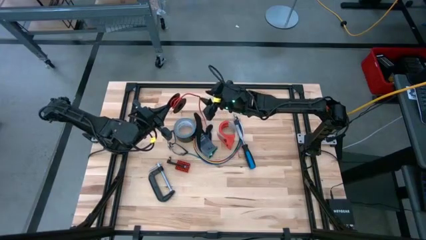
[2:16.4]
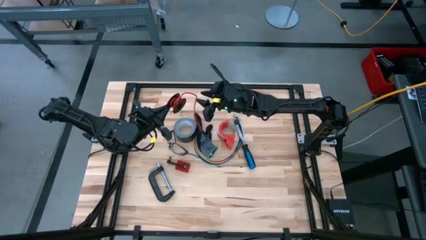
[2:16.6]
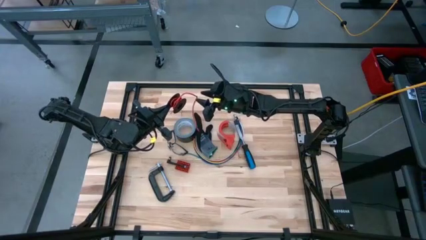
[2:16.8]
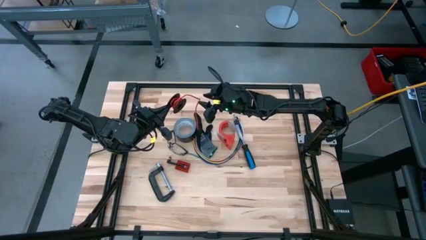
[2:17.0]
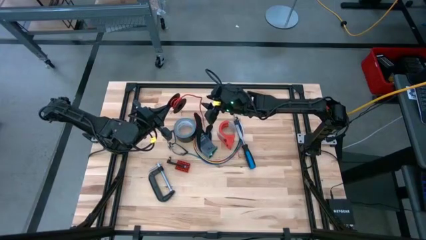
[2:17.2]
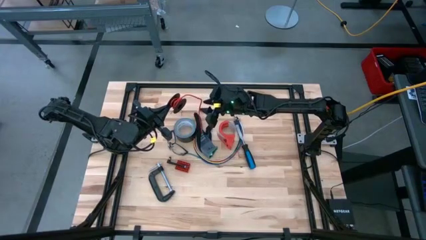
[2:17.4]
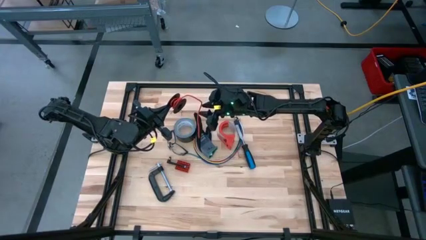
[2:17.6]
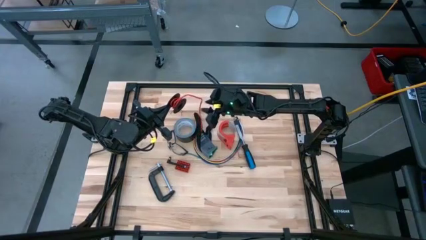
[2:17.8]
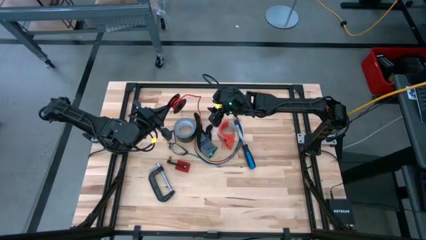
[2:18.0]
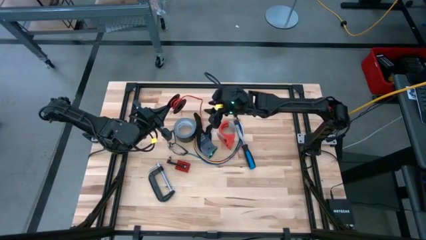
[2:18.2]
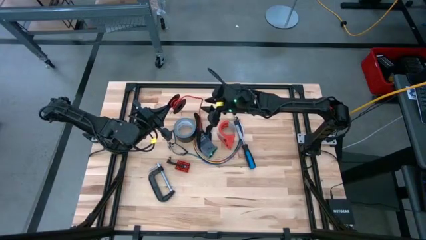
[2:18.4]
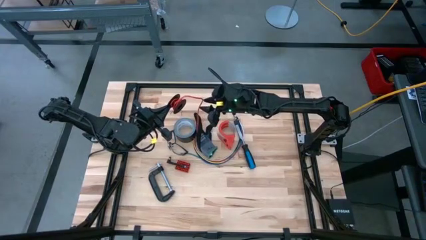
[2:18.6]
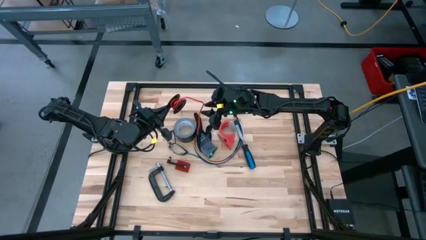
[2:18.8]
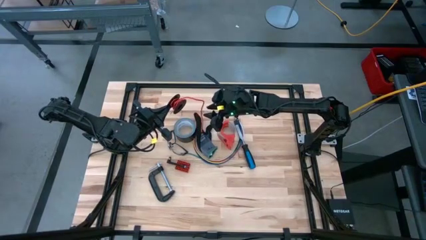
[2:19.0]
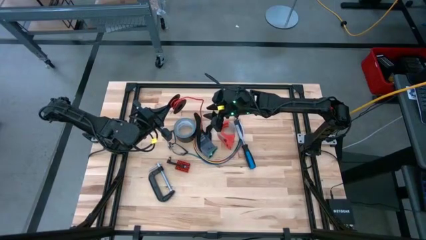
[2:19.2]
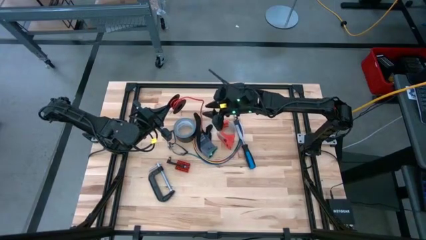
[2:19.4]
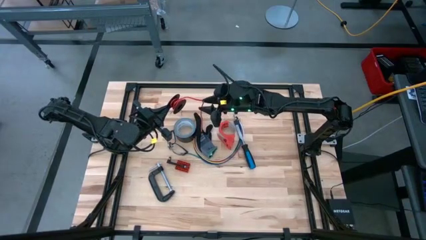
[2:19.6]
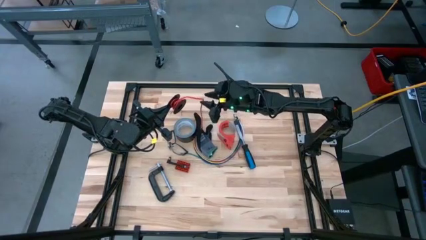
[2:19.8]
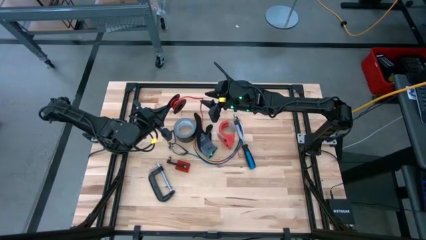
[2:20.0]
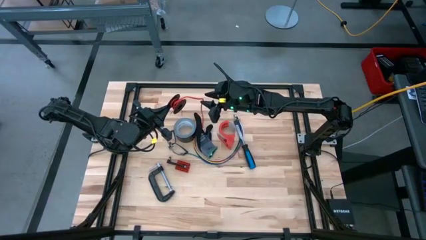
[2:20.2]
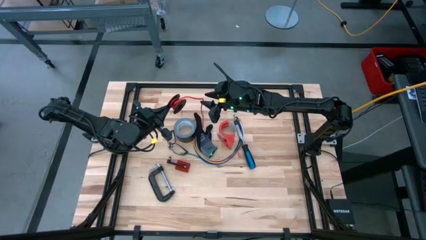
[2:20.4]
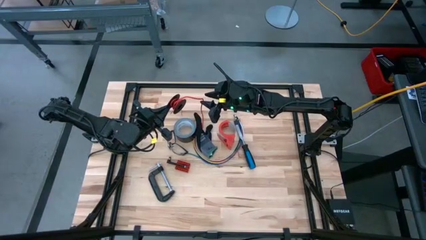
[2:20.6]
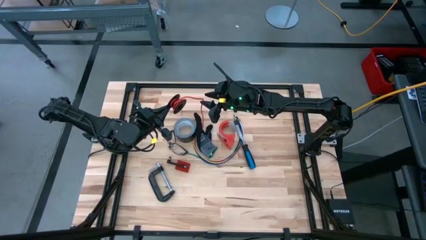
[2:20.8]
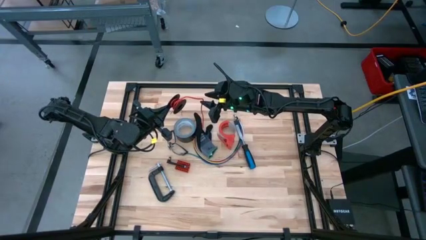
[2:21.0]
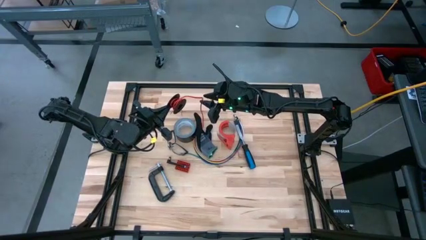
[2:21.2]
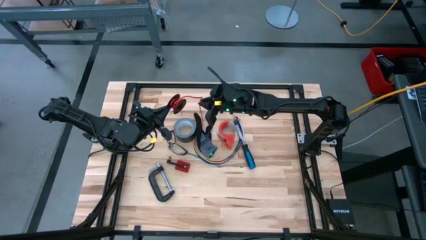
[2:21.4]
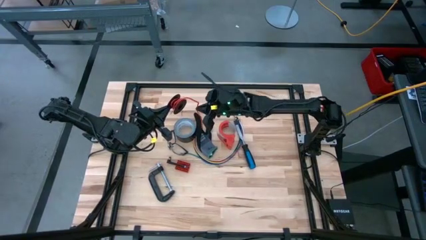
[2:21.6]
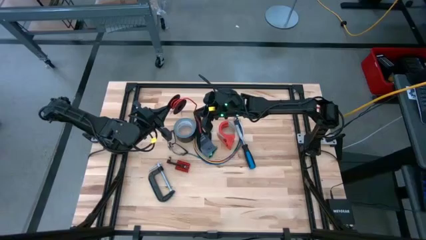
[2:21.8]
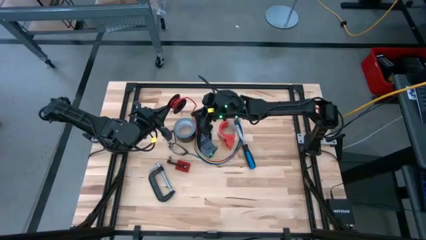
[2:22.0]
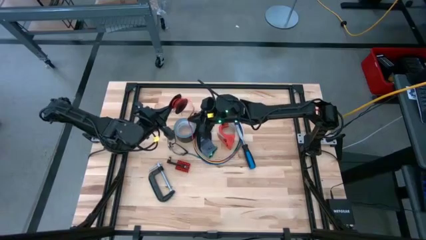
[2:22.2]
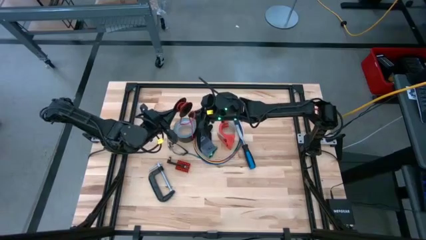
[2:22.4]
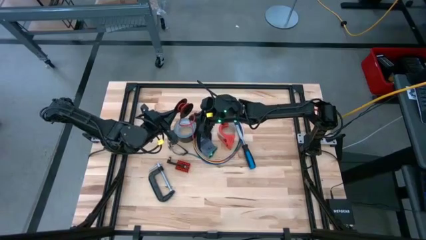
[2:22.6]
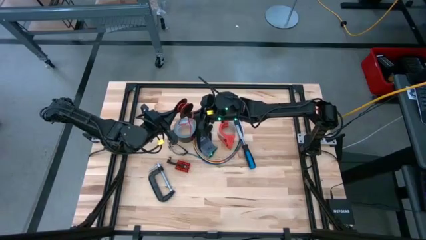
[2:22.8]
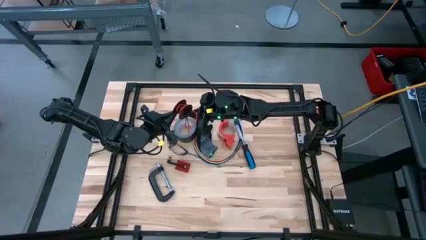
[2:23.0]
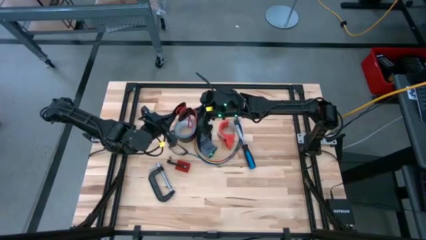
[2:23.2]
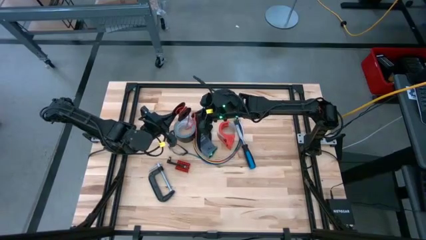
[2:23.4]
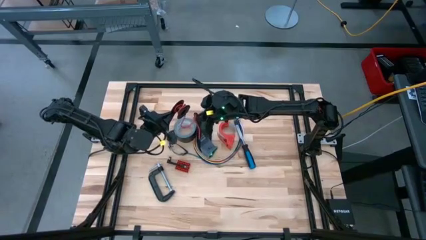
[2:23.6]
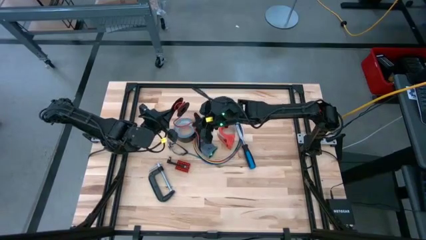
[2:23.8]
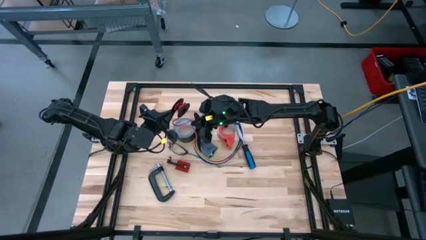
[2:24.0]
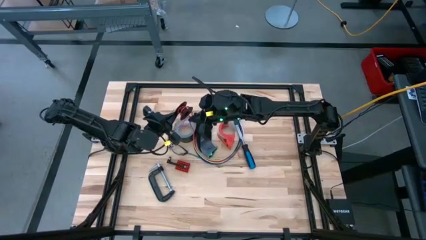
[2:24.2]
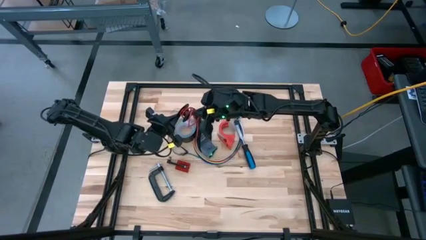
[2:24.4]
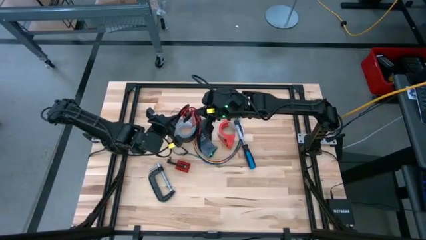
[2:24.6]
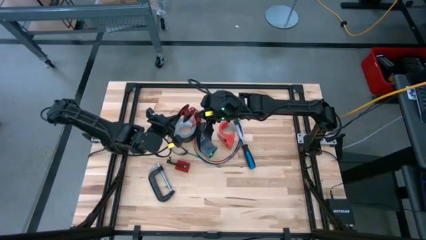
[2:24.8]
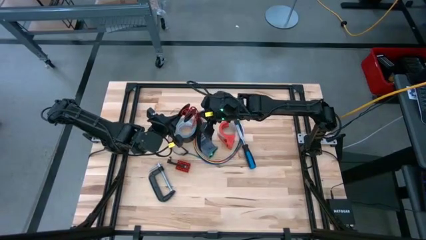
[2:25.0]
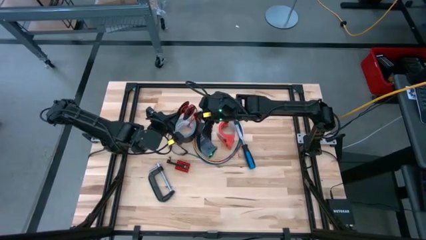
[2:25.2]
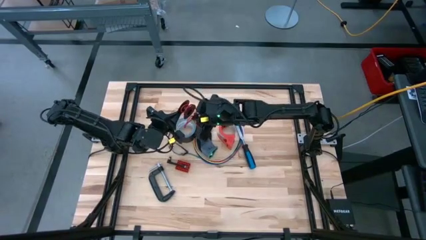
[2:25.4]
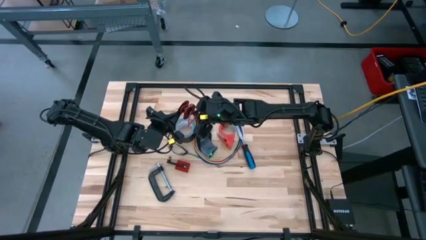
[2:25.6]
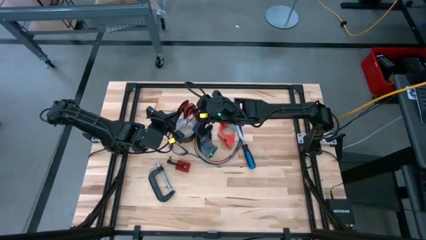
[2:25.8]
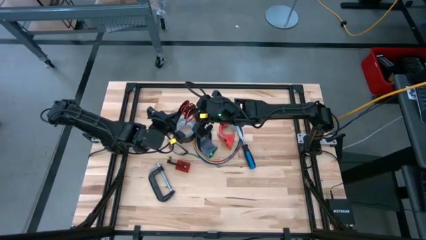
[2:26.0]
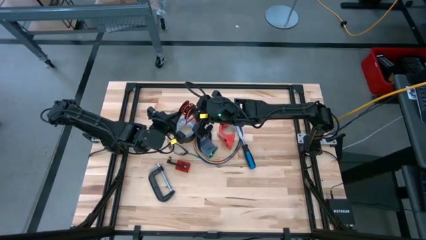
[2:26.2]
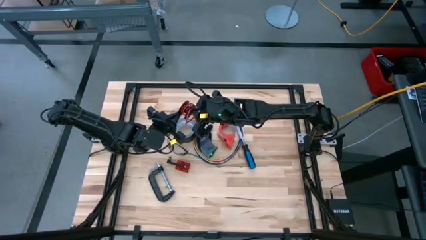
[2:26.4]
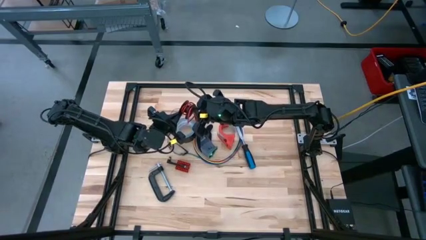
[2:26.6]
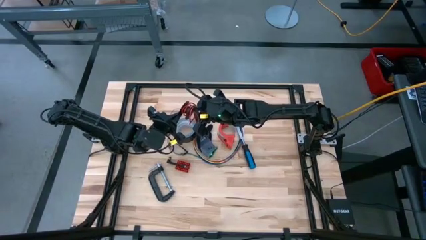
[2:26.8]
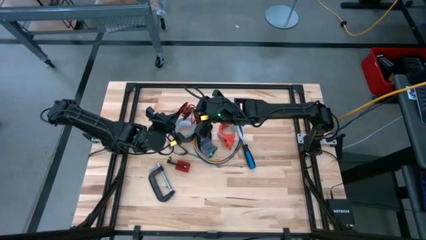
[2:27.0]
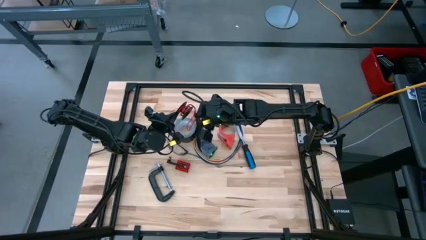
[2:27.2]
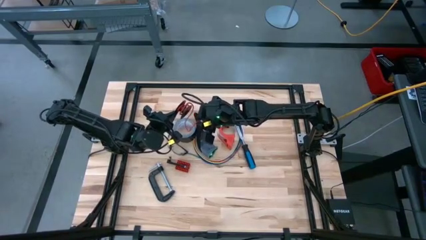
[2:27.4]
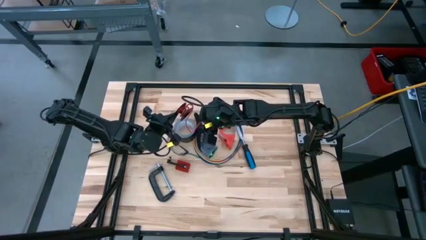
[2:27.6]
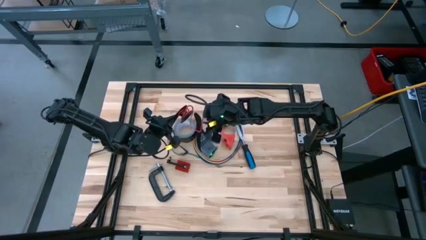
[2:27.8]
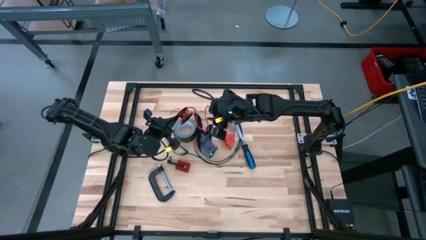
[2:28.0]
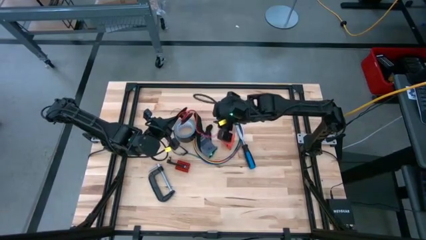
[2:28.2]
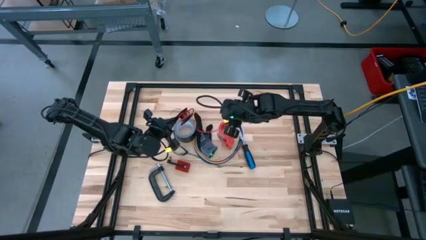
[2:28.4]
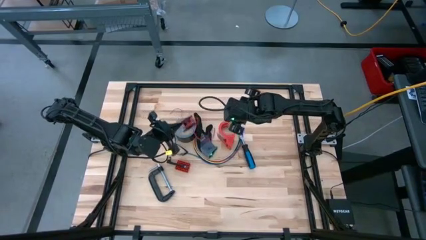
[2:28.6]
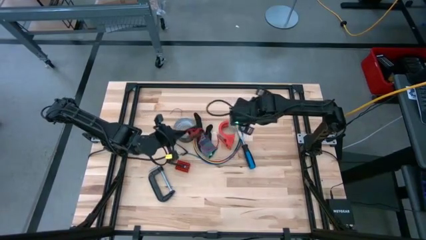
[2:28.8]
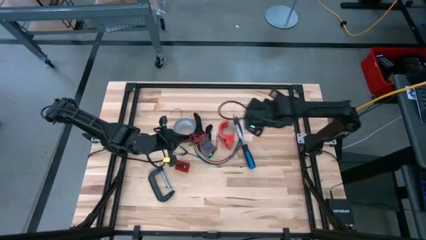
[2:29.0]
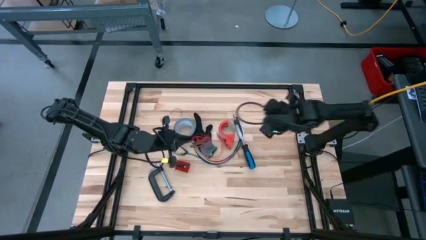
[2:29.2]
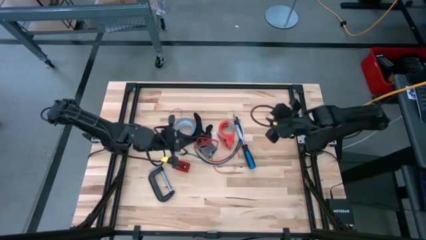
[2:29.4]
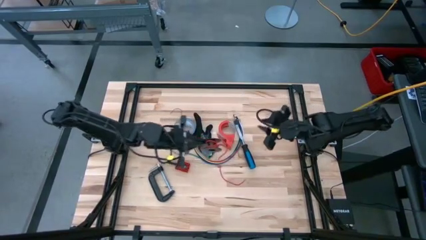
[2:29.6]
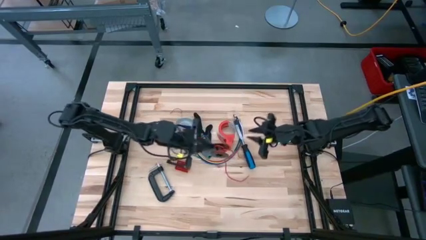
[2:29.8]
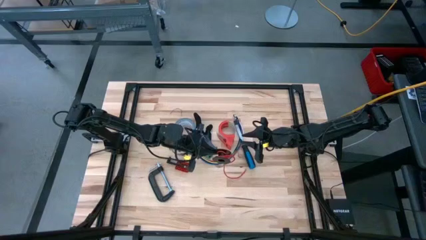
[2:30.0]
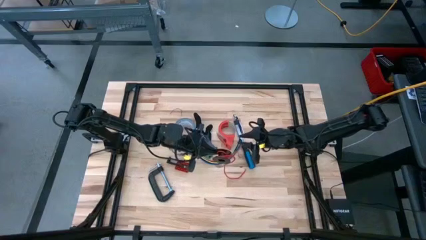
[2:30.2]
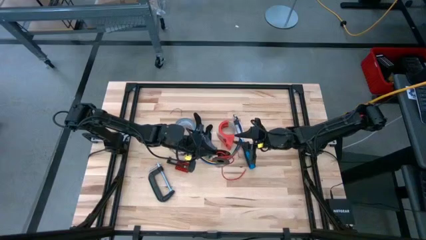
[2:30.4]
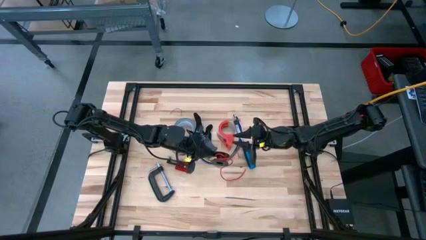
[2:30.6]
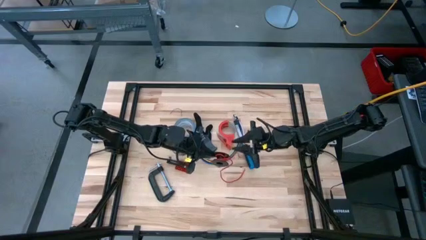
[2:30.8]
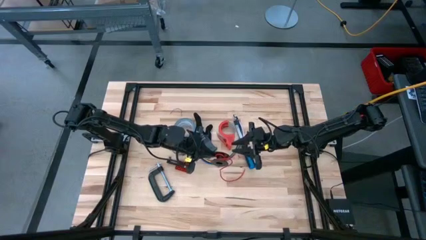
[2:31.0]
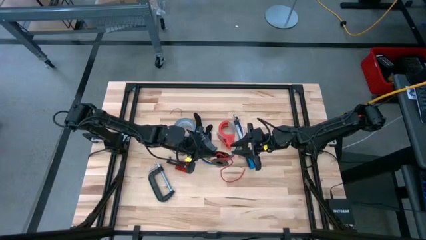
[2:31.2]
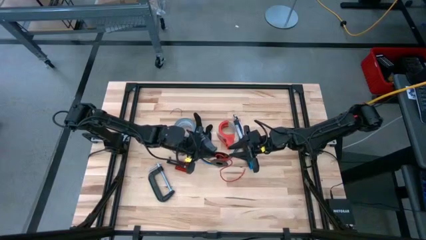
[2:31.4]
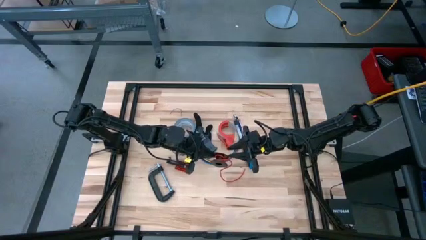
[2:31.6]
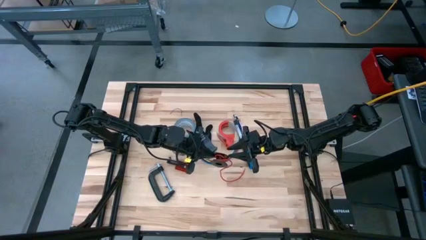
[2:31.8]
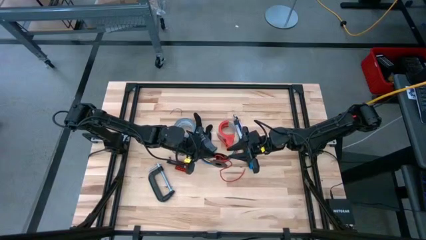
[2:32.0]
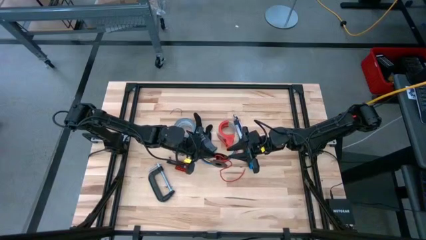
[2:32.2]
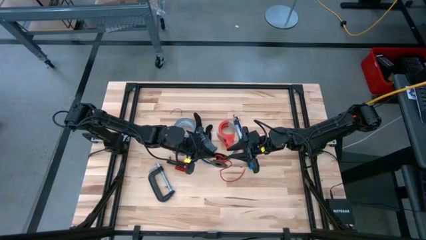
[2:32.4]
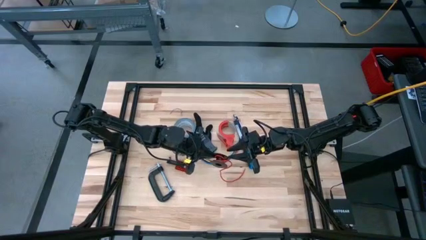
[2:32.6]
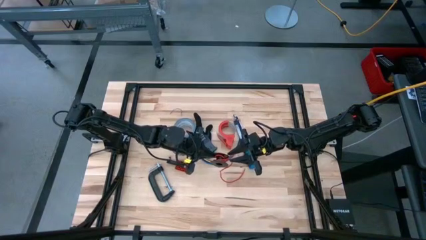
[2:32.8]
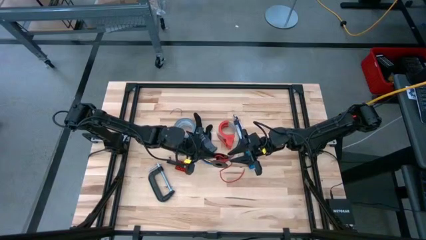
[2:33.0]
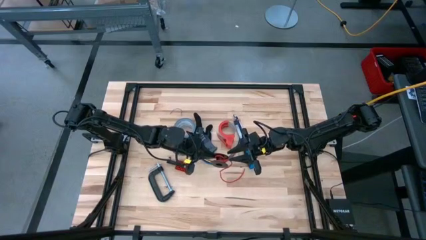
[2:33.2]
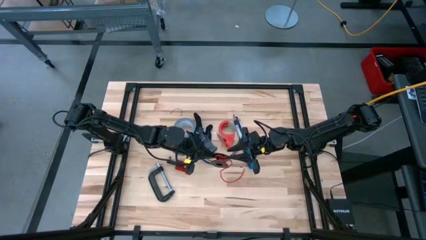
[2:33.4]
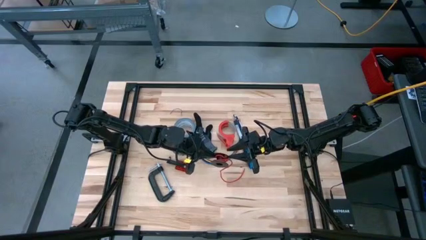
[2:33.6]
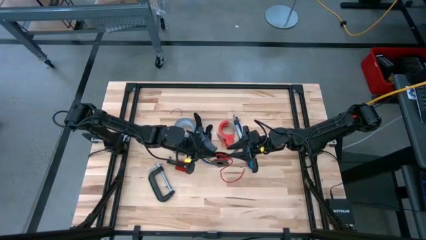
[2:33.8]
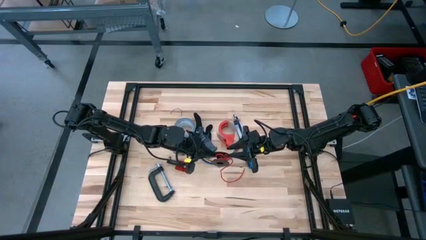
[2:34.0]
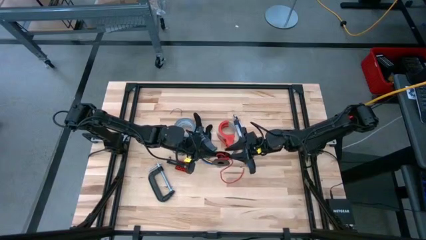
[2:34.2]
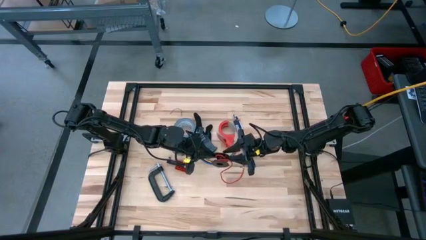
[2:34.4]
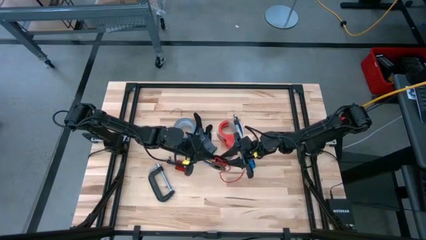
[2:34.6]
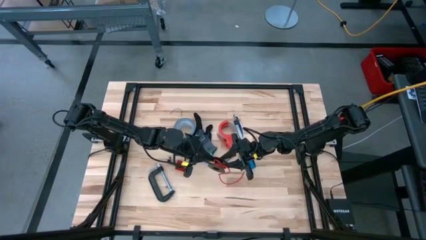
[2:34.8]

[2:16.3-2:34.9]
Task: Coil cords
Coil the red wire cable onto the black spool
